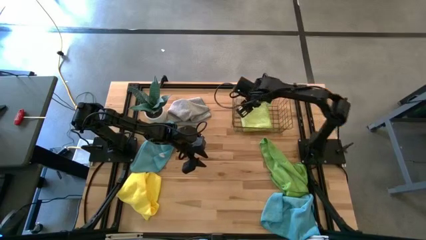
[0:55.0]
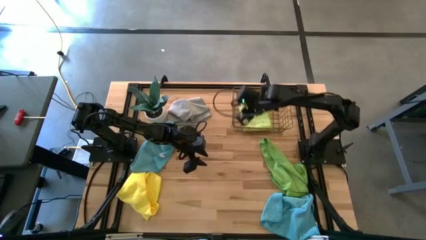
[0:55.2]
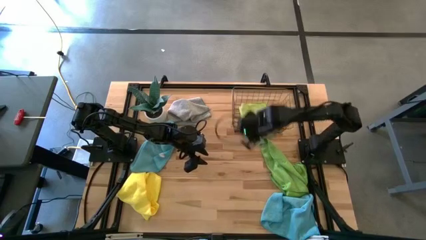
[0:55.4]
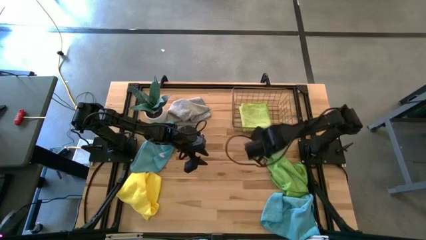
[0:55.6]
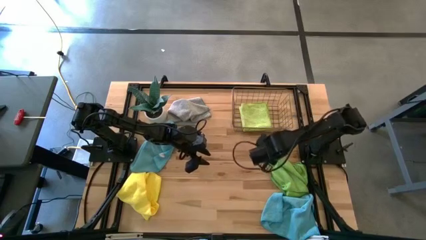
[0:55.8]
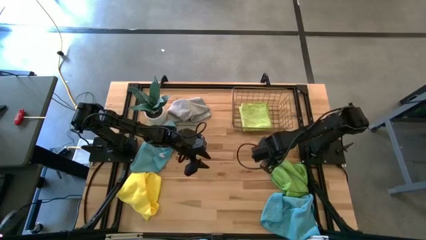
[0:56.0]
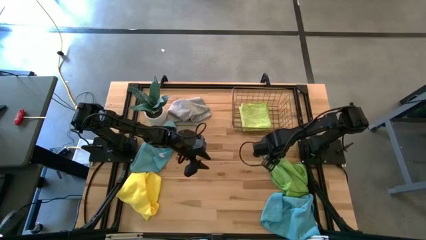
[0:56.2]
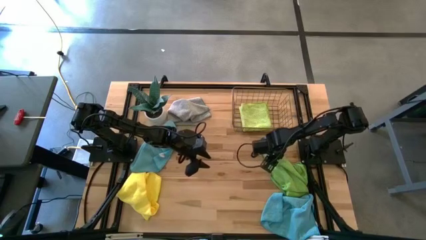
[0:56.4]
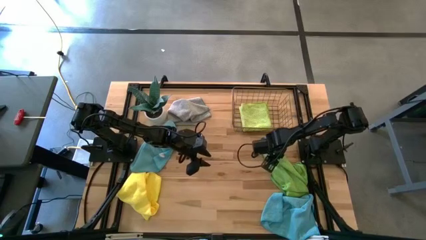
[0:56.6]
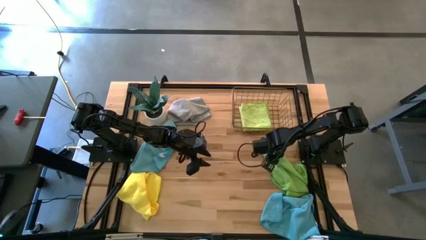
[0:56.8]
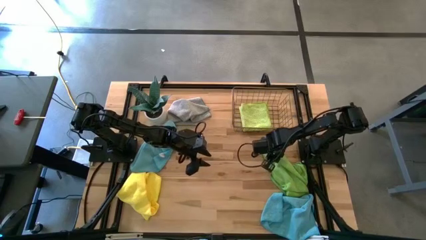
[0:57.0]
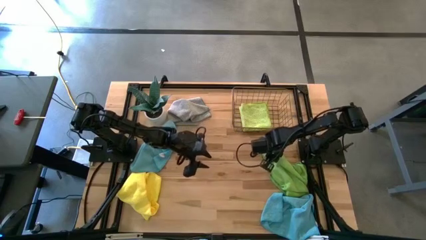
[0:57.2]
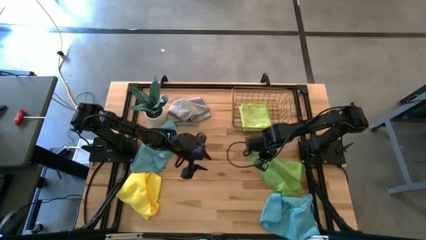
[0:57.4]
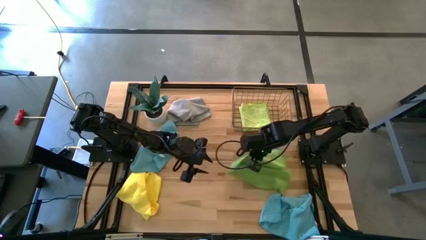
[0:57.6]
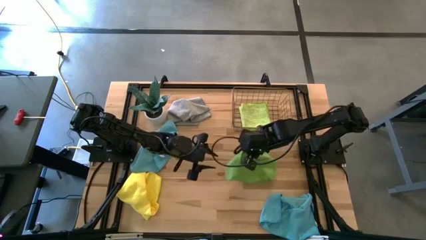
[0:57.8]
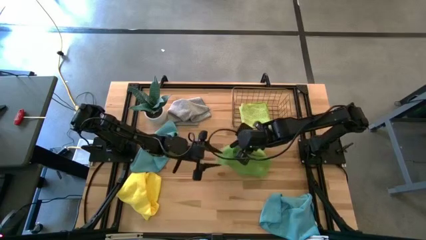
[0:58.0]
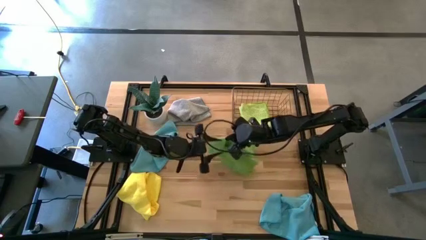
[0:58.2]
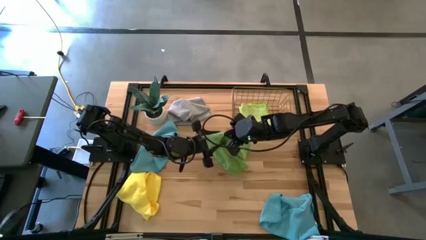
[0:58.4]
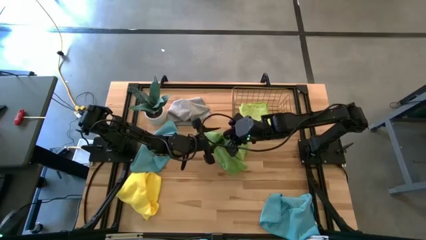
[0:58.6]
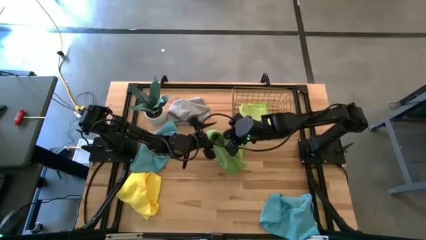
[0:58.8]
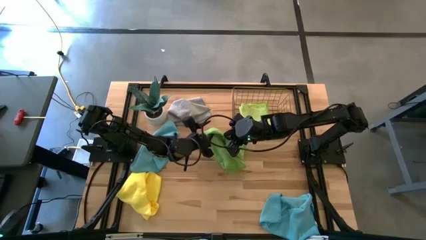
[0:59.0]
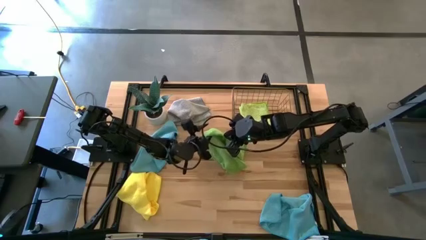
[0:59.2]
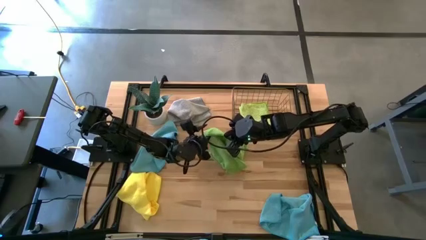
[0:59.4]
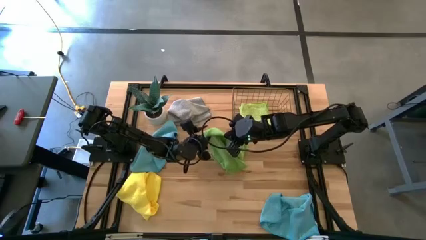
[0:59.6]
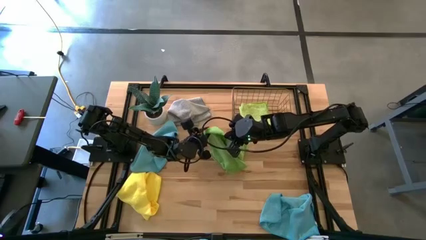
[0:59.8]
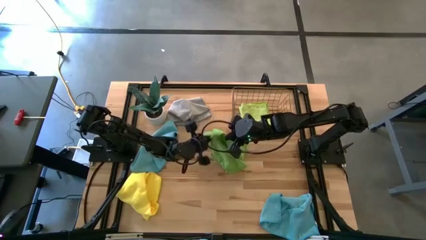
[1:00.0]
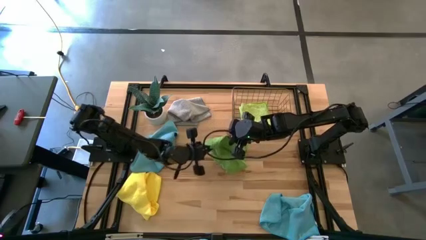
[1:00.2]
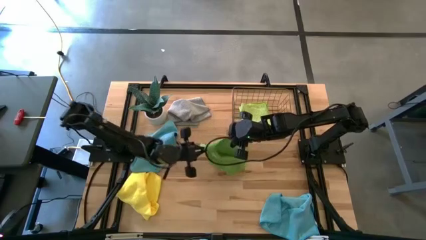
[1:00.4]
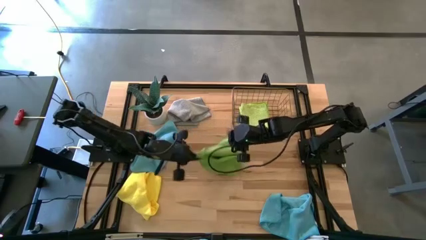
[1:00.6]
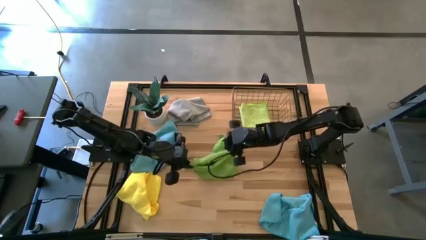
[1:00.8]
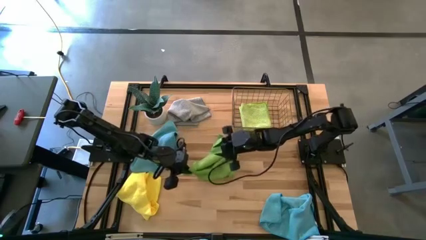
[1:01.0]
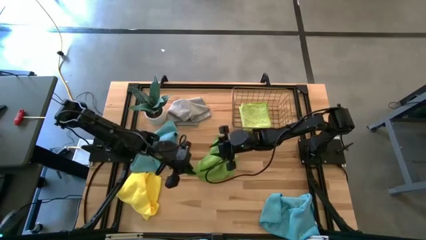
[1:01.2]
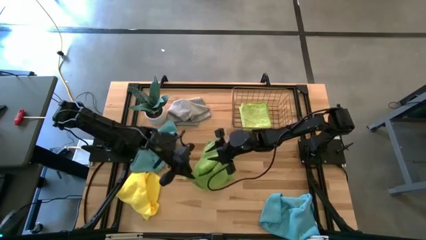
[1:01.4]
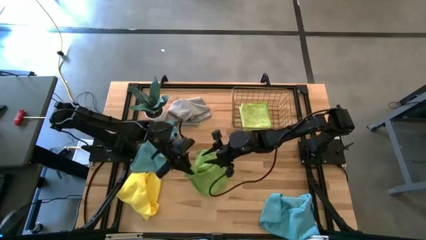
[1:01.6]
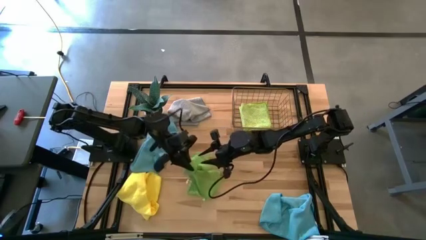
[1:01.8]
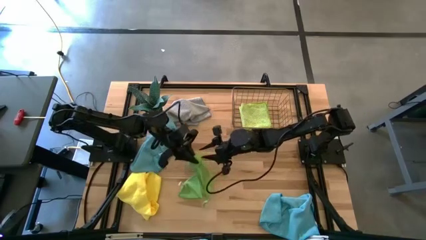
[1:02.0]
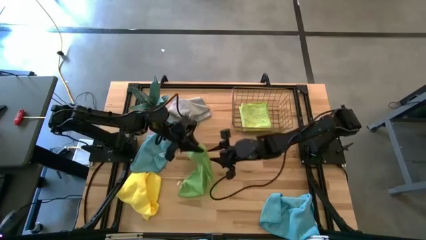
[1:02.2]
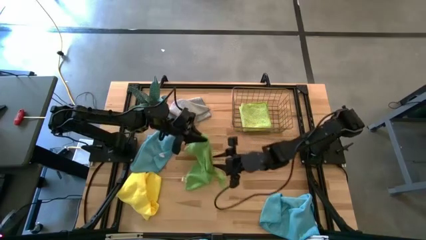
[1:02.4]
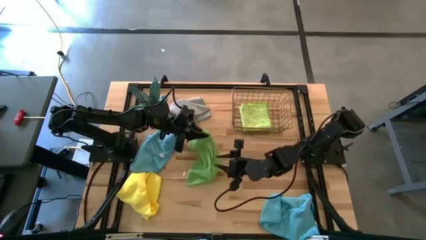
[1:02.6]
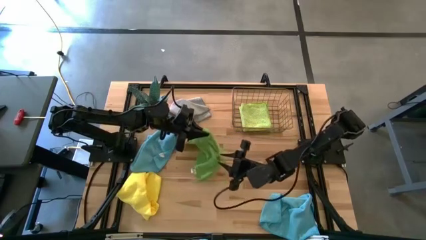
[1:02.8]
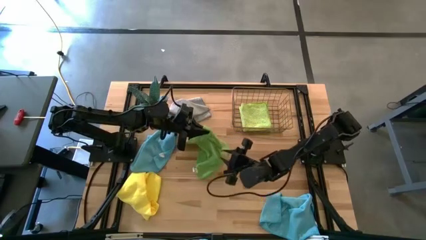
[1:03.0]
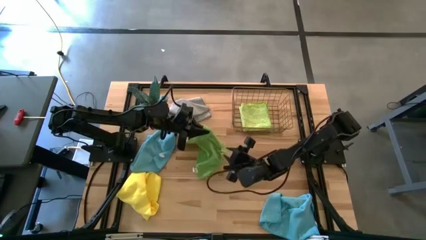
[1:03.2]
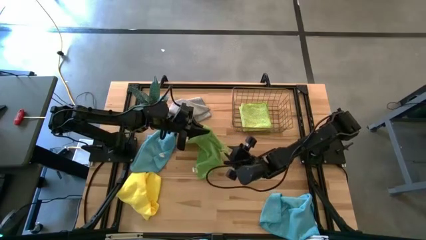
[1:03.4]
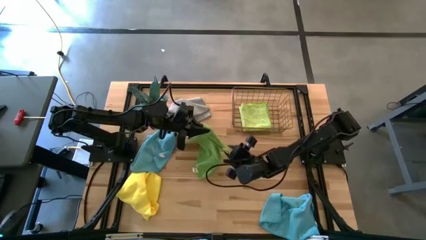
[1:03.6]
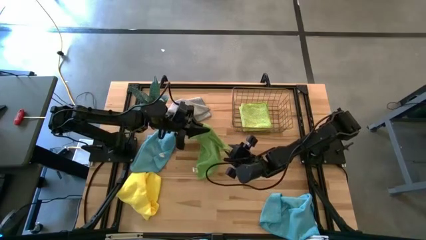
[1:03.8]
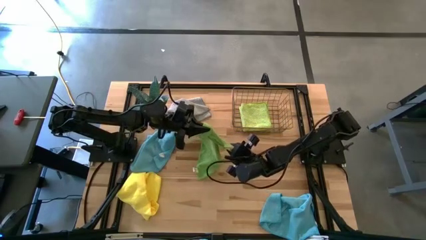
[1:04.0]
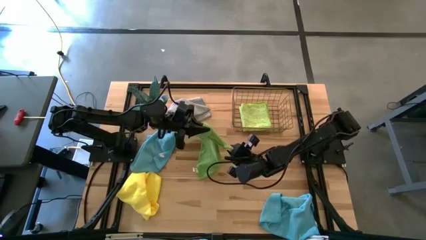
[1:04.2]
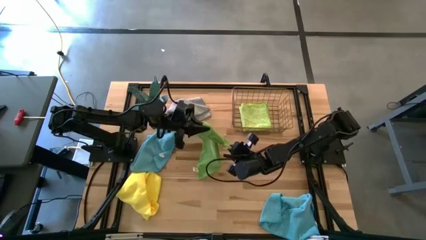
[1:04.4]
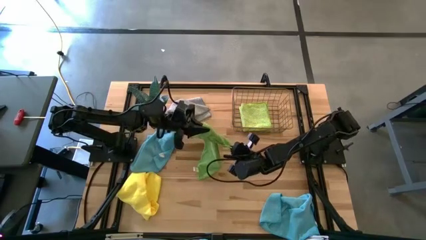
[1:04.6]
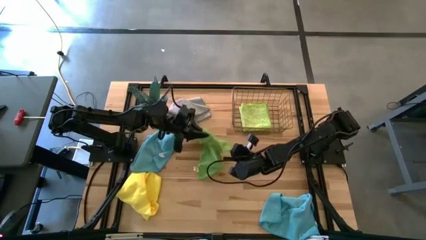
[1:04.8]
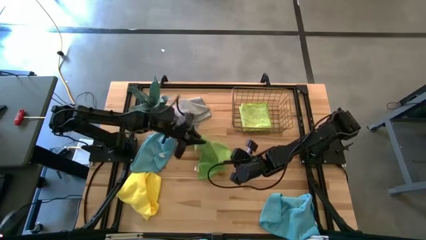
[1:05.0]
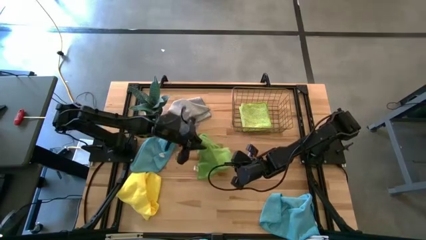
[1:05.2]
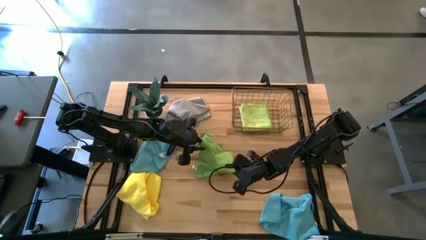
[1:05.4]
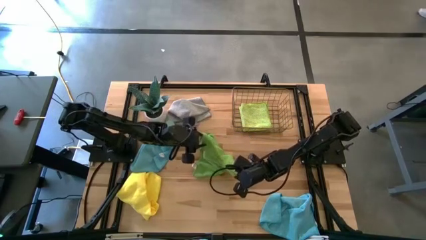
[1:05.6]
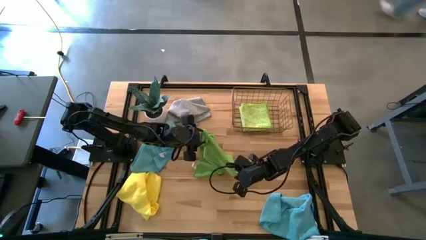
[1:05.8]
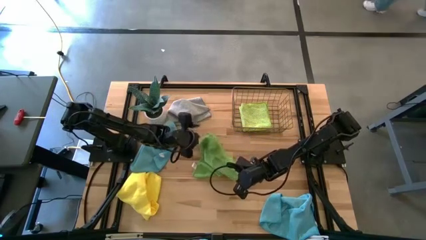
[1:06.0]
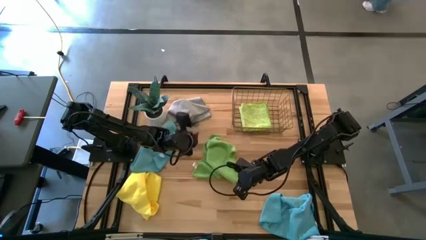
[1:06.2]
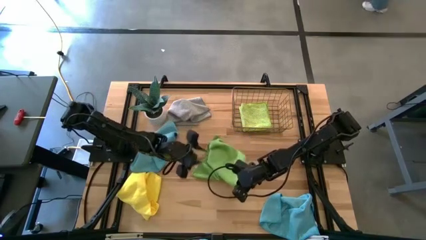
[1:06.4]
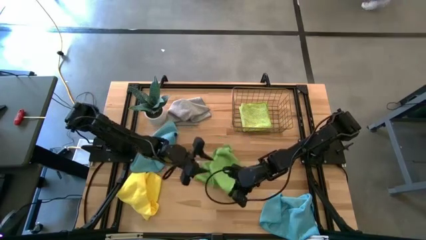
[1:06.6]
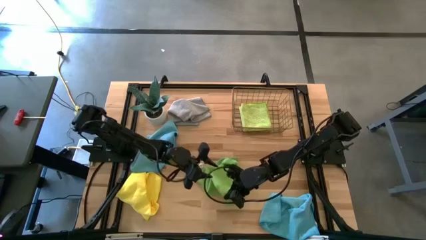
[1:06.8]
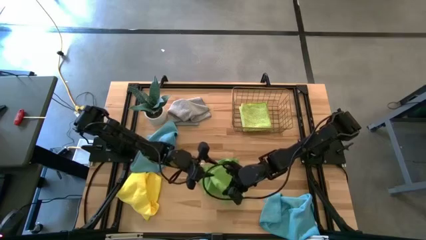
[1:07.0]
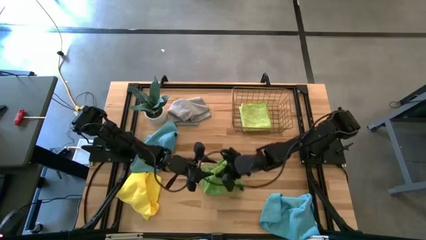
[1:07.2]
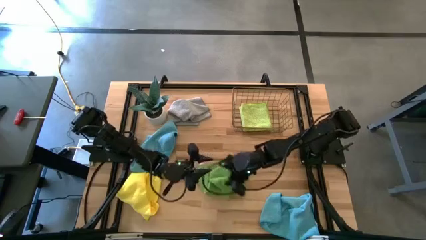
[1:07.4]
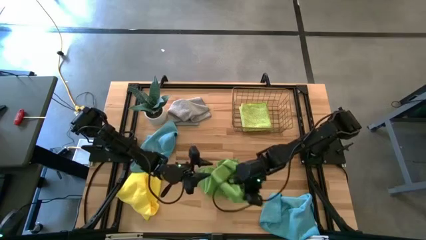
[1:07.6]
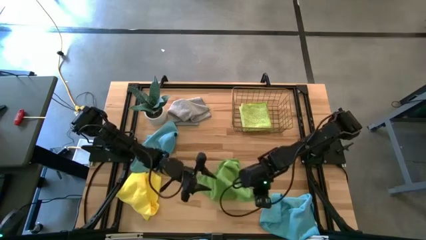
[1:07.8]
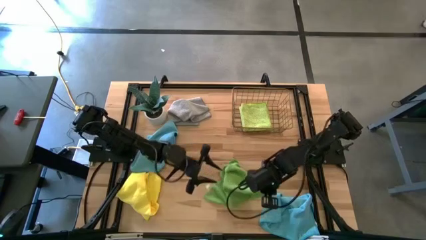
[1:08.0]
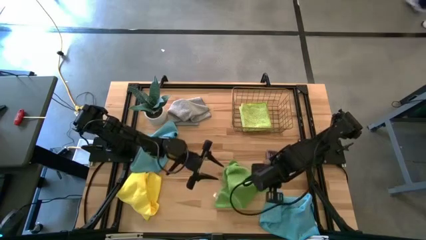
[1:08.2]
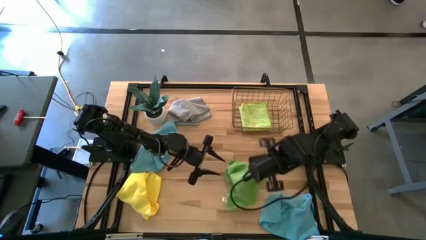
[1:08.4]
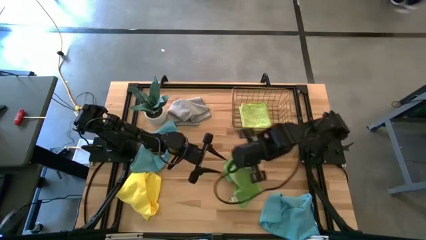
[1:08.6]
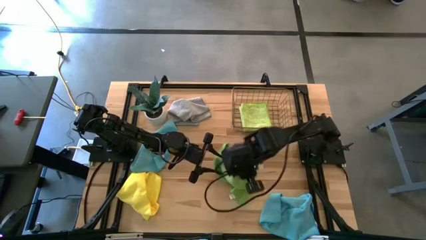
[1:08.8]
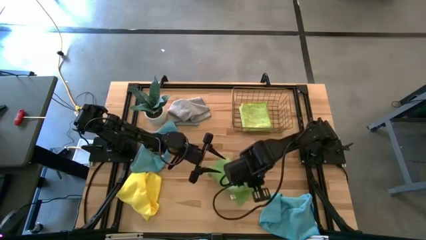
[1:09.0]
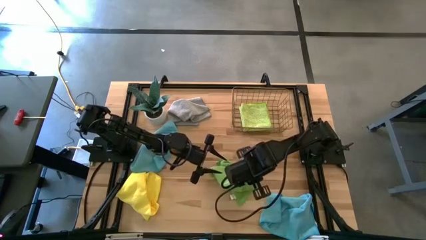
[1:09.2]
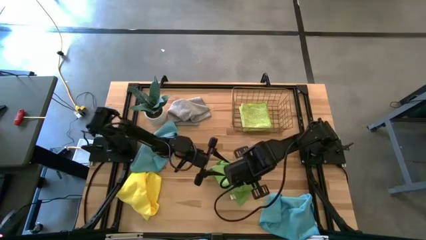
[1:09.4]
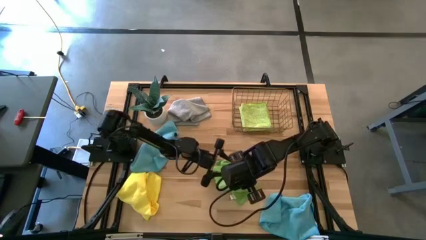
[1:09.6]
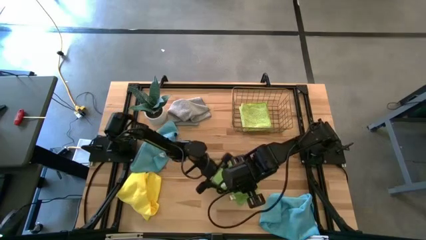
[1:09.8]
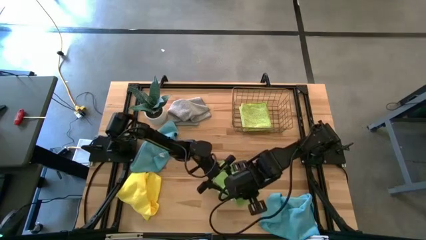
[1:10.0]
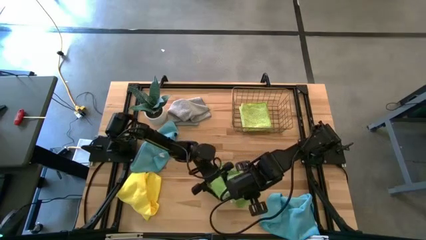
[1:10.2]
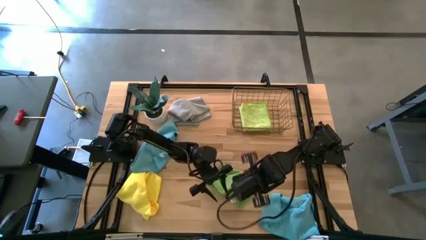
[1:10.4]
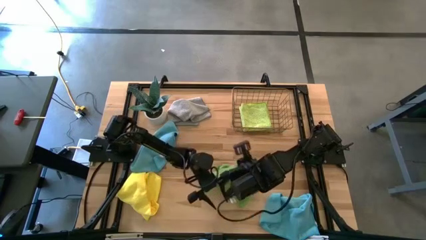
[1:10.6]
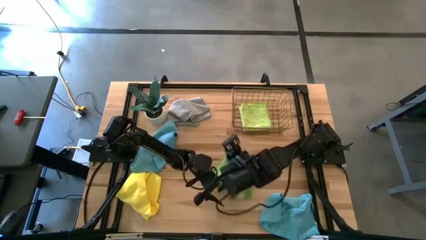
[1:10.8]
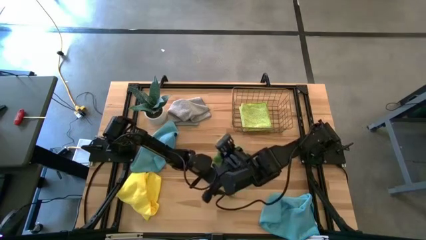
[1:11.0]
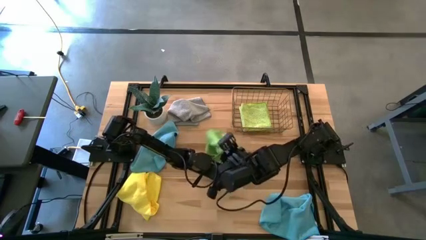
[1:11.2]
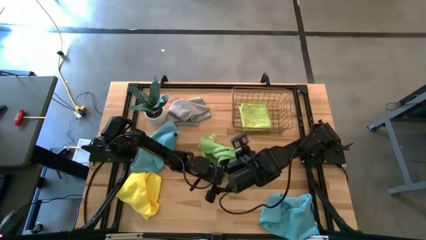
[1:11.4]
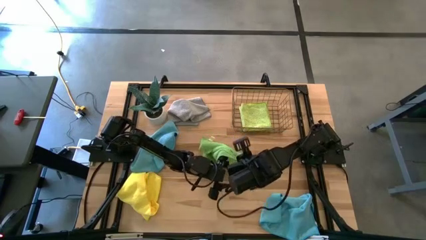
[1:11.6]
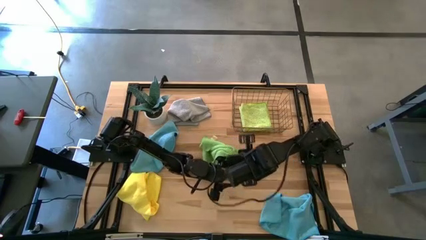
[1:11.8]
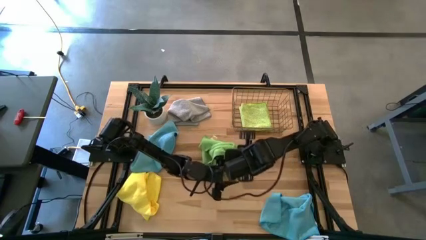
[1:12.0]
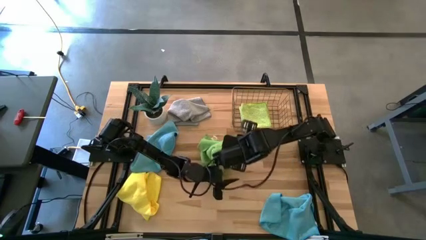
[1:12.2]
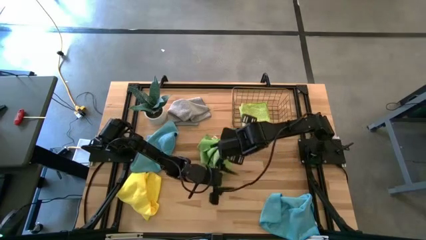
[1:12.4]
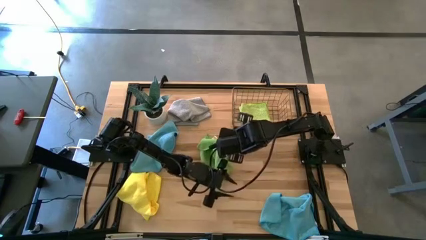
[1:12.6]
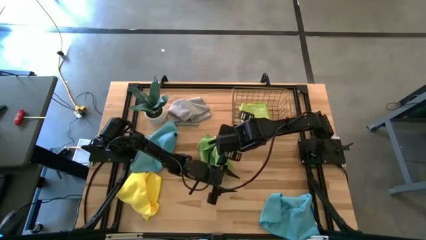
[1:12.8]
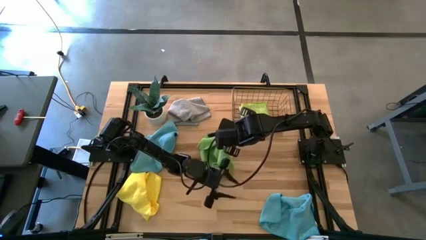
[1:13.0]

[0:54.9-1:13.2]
Task: Fold microfiber towels
Fold the green microfiber towel
